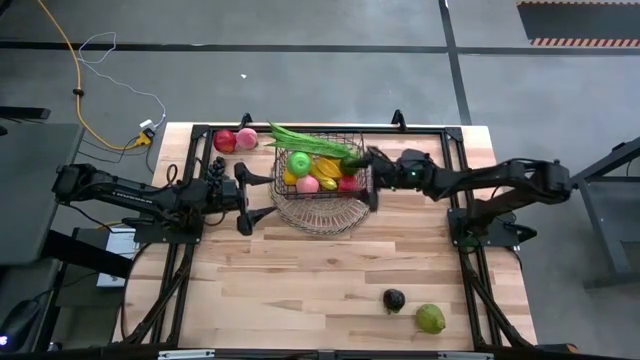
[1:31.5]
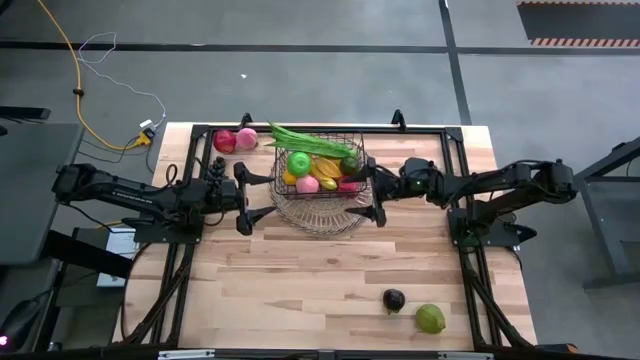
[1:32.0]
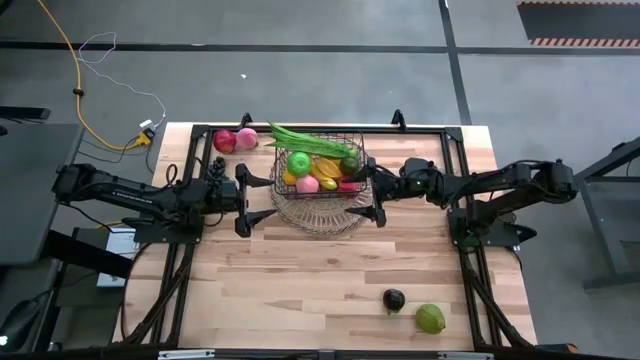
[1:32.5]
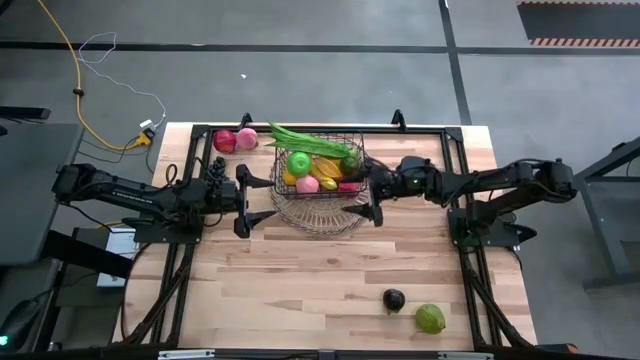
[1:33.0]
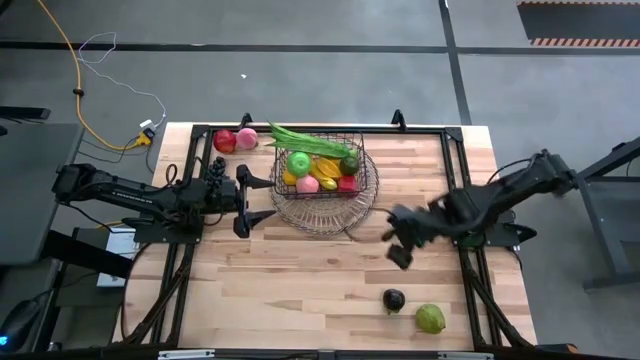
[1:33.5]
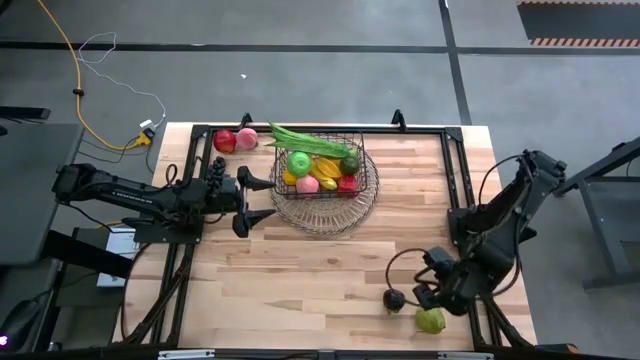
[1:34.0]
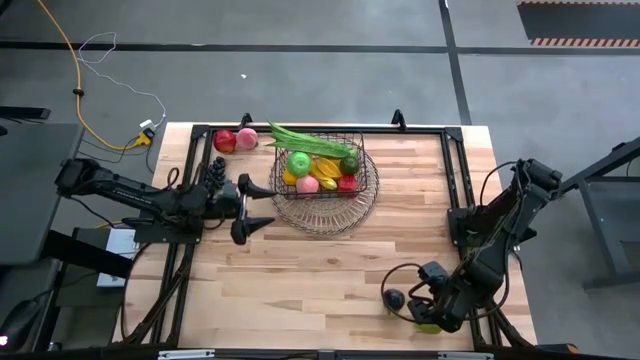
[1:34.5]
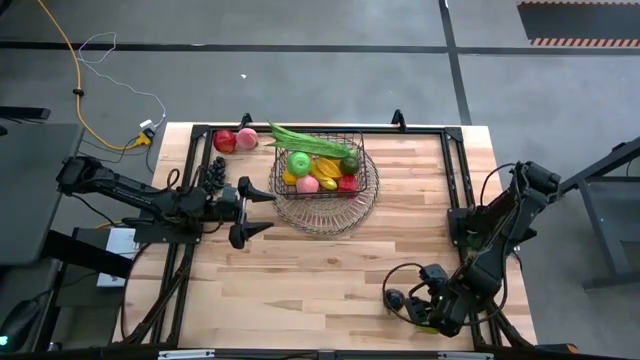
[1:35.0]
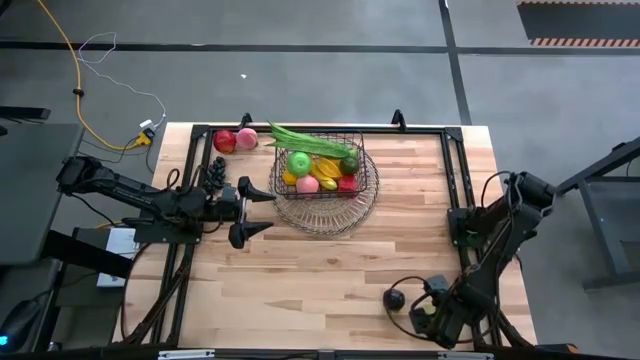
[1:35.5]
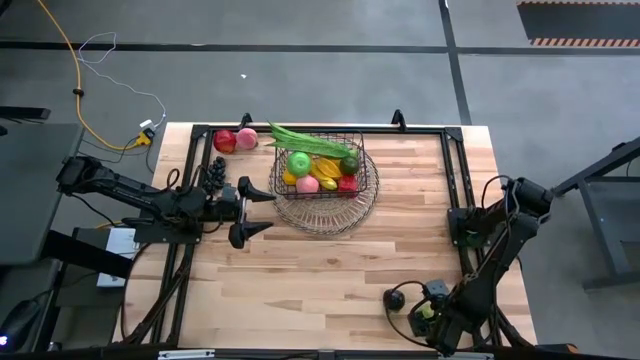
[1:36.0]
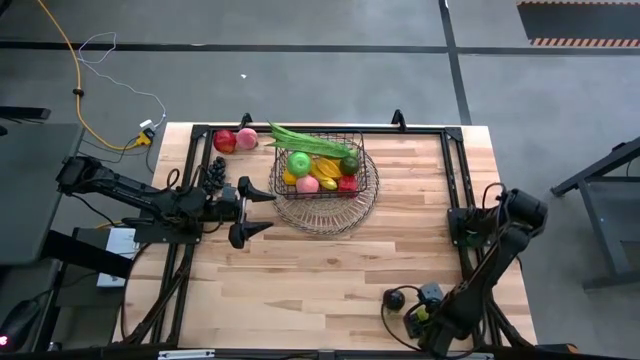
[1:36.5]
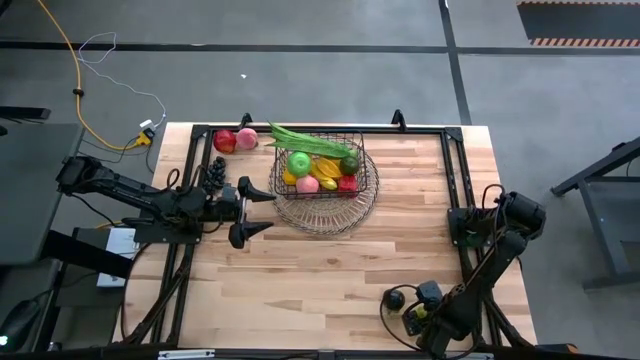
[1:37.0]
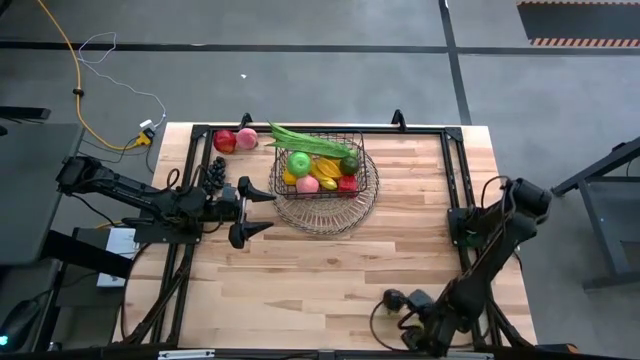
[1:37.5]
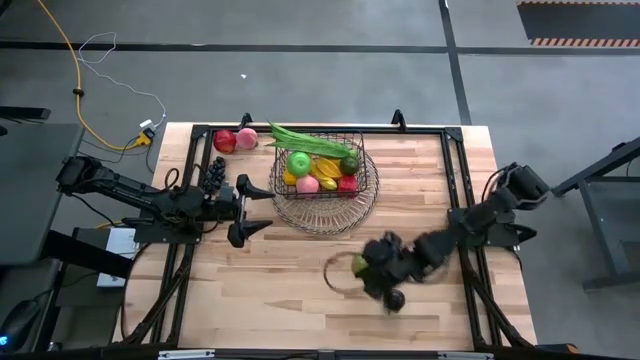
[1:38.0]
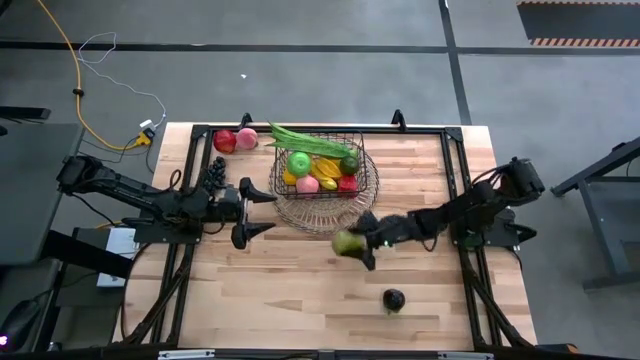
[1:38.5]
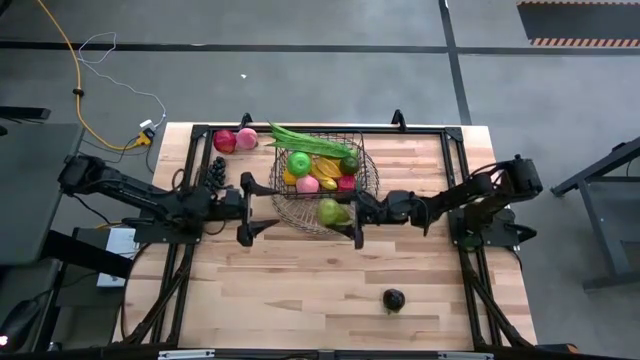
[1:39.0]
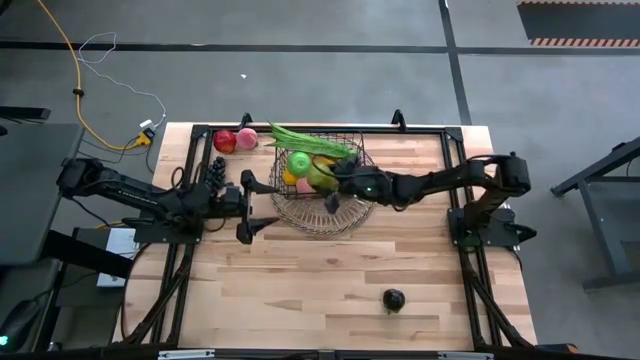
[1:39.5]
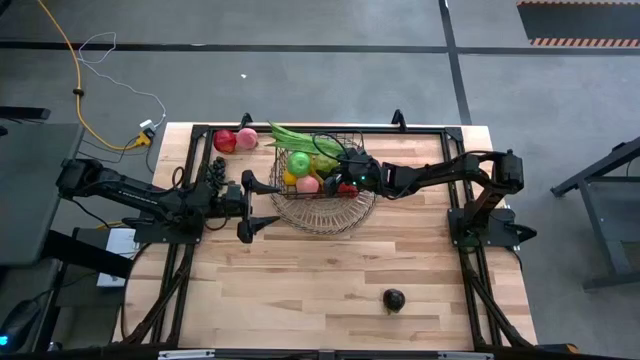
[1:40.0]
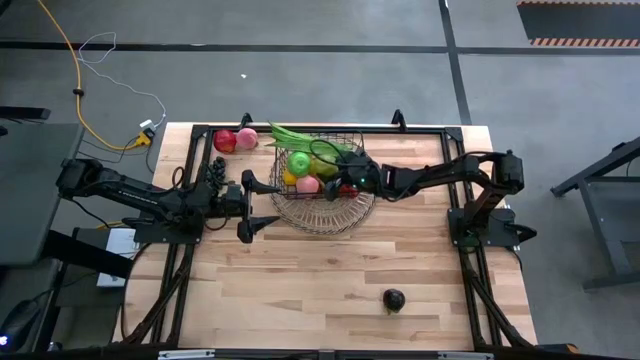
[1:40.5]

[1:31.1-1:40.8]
Task: Build produce basket
Put the pear into the wire basket

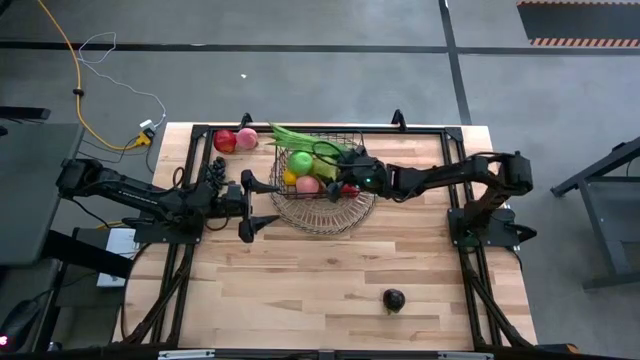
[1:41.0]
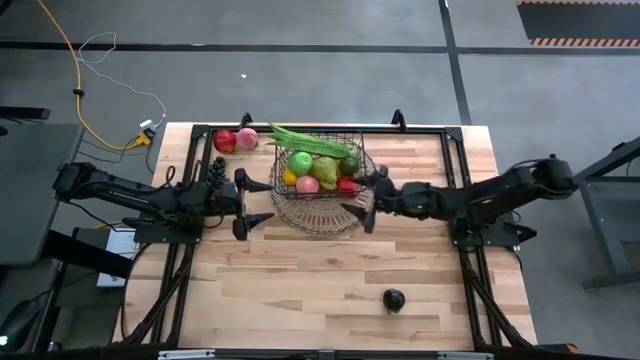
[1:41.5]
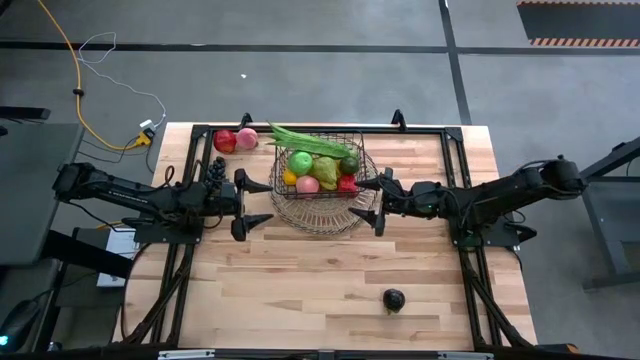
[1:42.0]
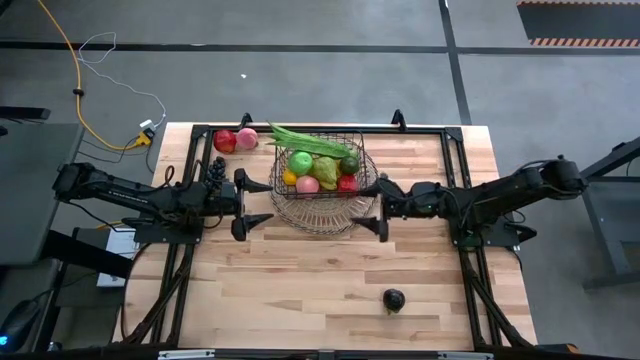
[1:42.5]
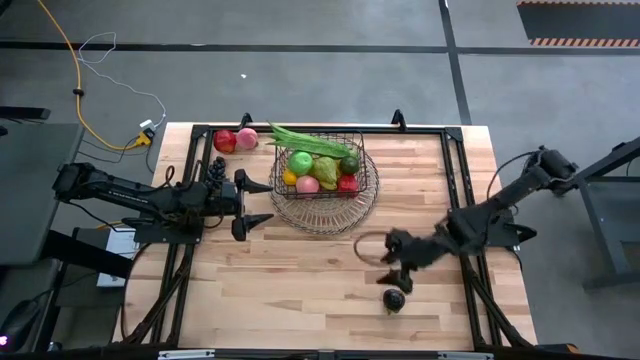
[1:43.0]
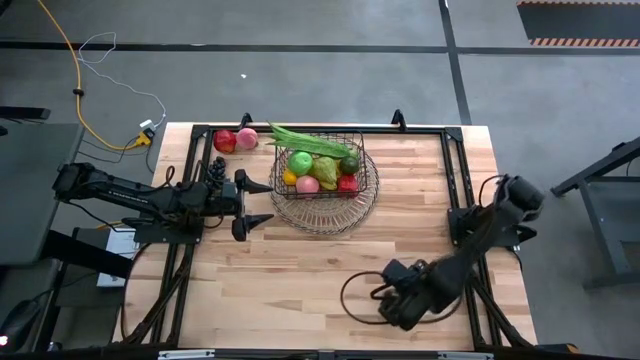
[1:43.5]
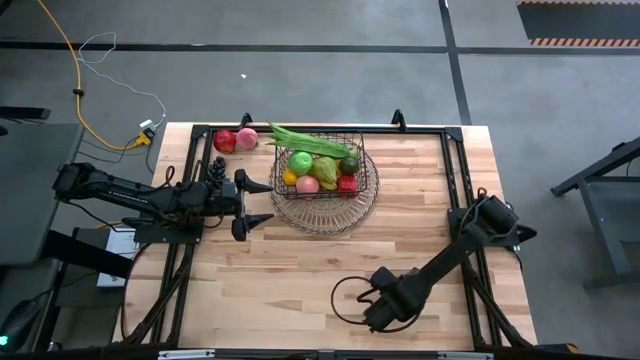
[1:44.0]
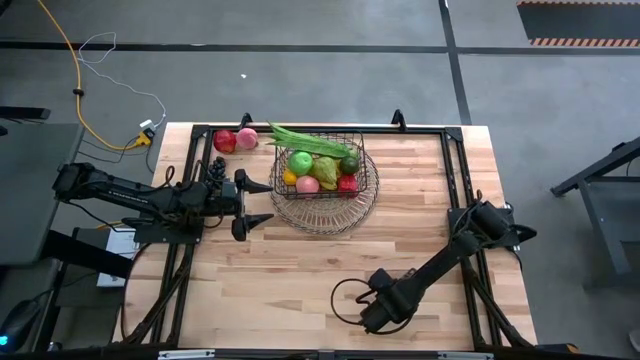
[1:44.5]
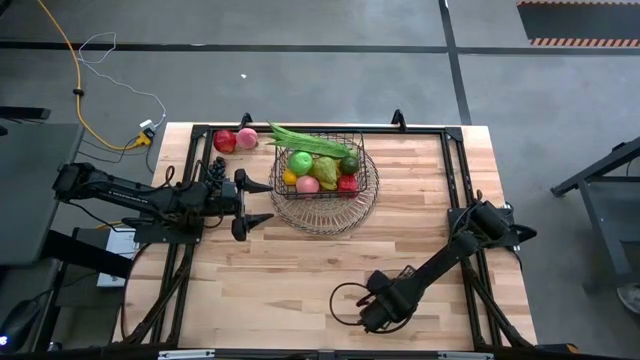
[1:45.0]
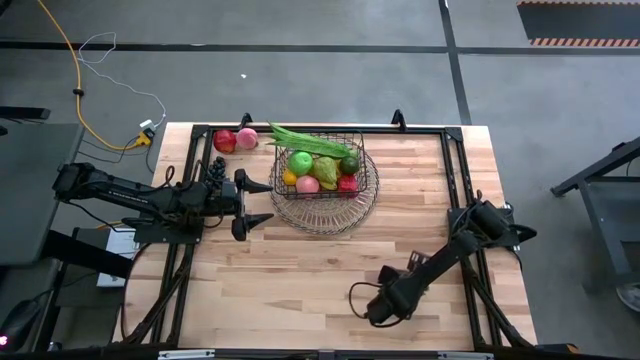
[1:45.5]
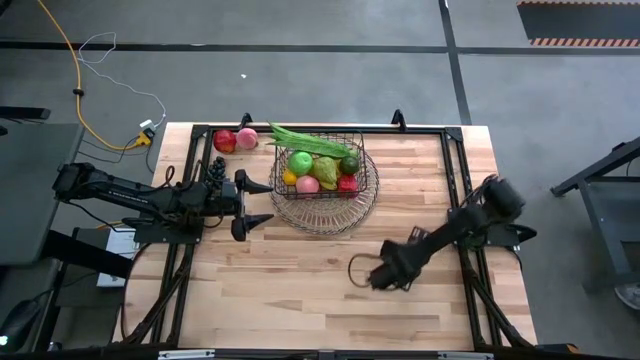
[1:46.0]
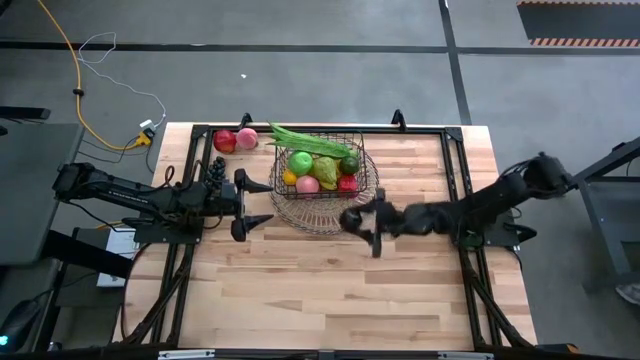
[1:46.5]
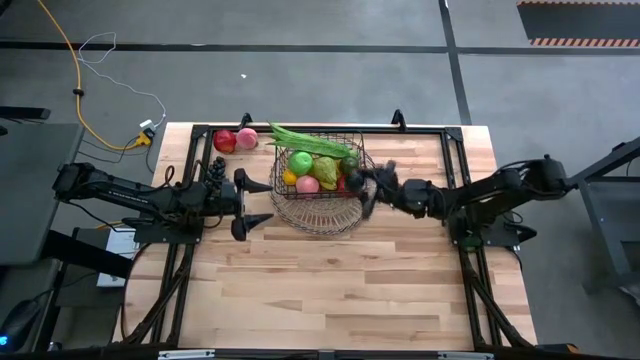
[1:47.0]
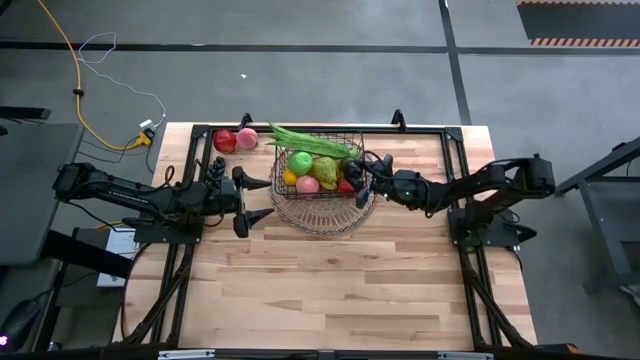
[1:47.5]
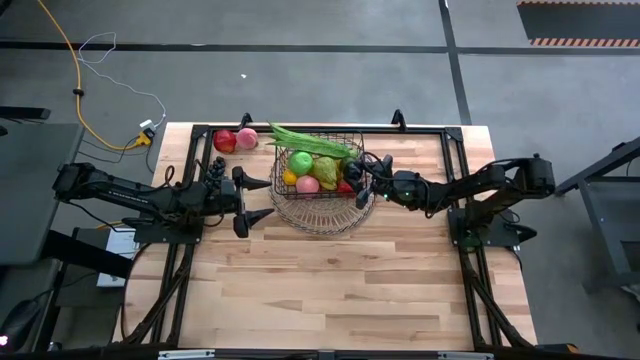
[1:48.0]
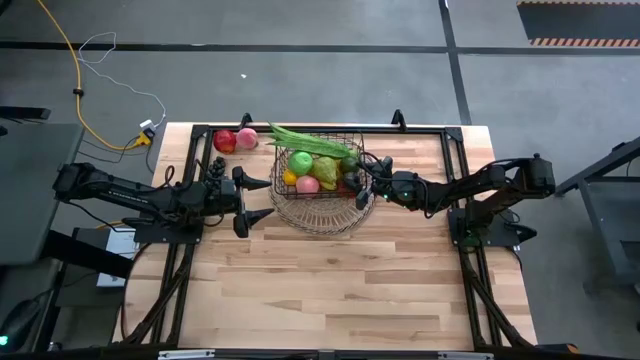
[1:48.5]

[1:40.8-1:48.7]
Put the mangosteen into the wire basket

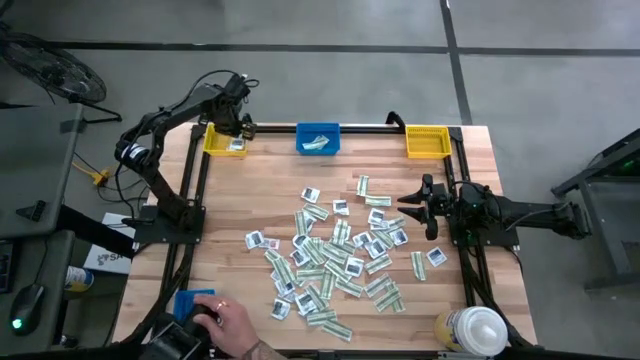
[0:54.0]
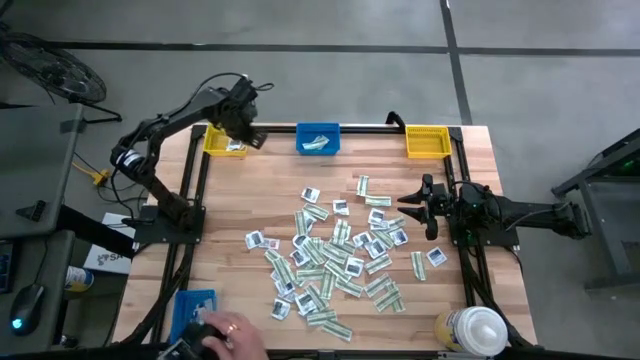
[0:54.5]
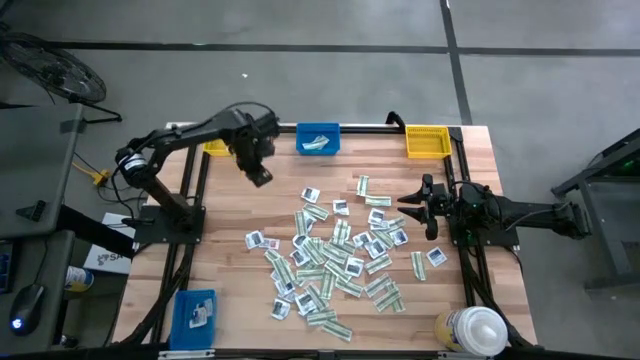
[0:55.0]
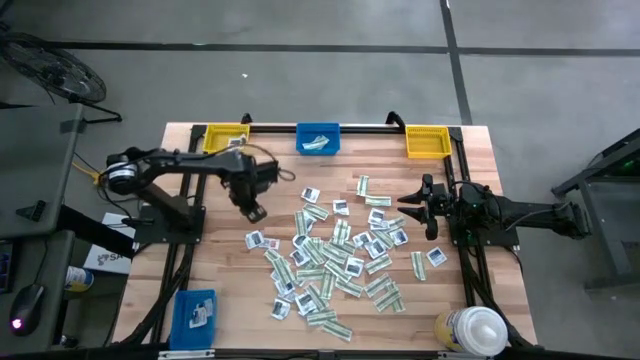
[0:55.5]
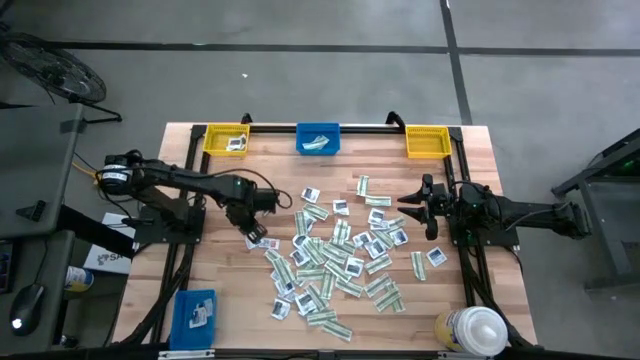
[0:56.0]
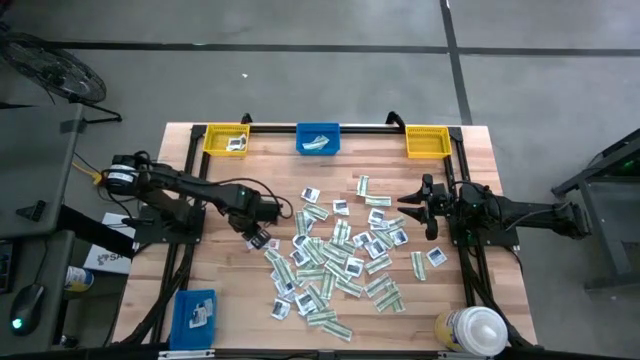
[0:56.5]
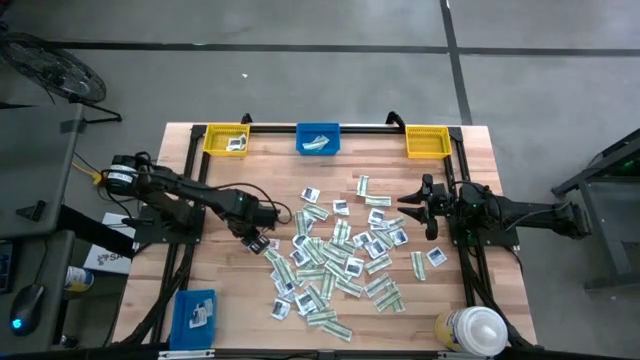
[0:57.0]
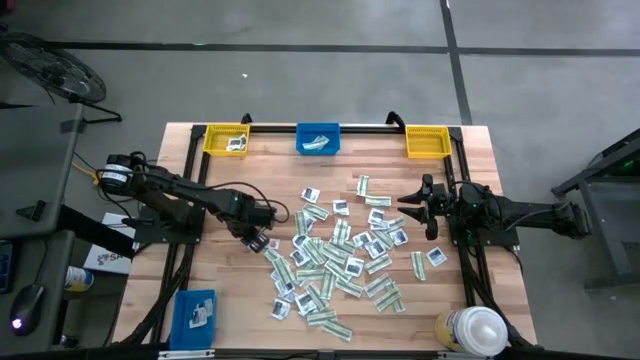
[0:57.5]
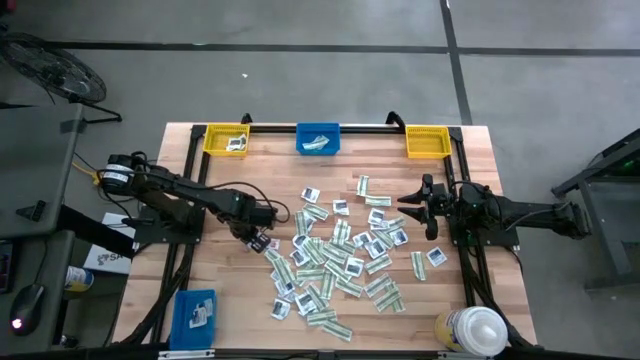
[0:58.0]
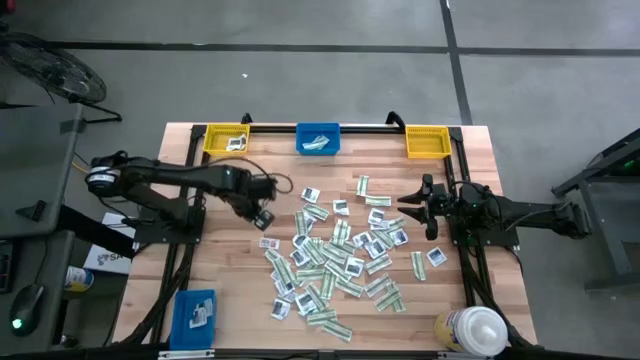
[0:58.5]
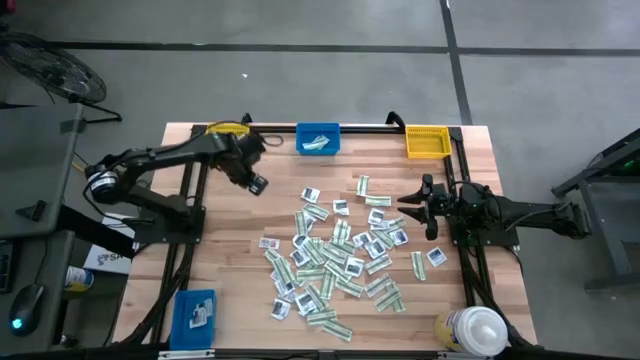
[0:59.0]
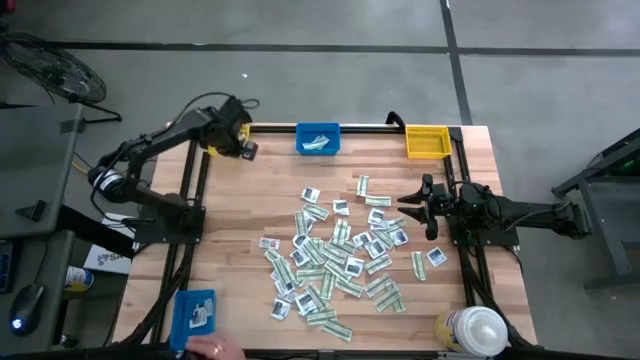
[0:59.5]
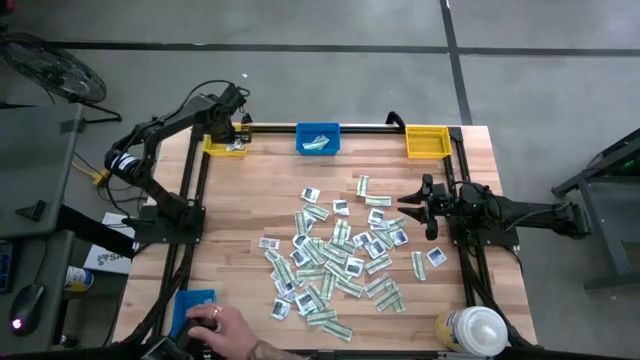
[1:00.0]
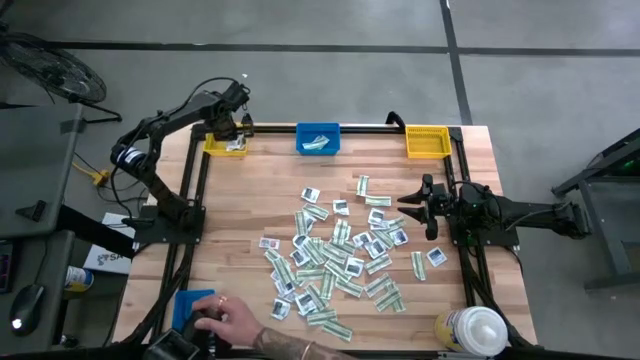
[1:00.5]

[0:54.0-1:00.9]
Task: Pick & Place First Aid Supplies
Put the gray towelette pack into the left yellow bin
